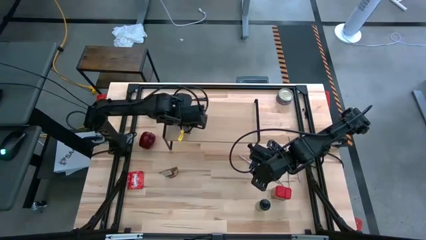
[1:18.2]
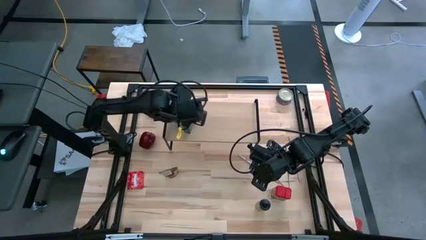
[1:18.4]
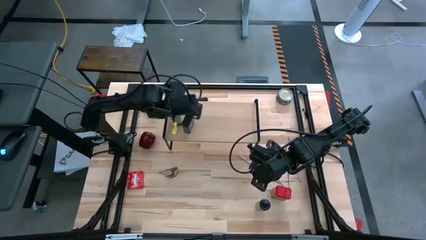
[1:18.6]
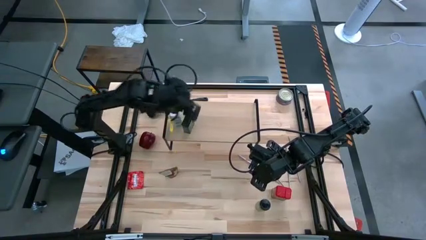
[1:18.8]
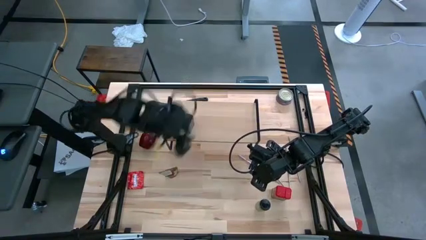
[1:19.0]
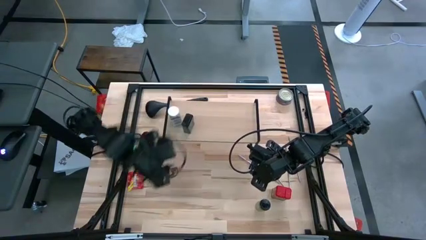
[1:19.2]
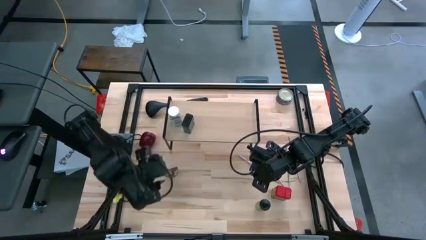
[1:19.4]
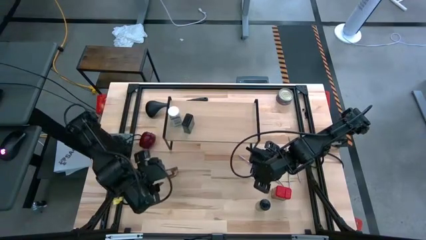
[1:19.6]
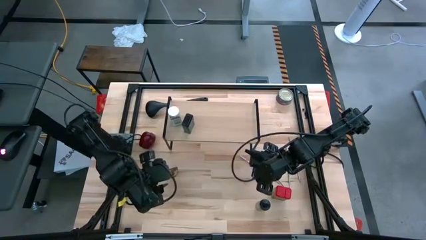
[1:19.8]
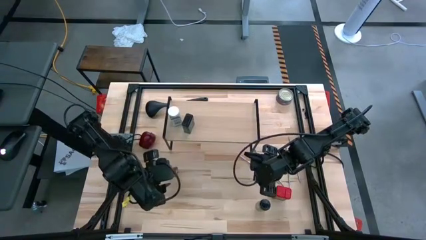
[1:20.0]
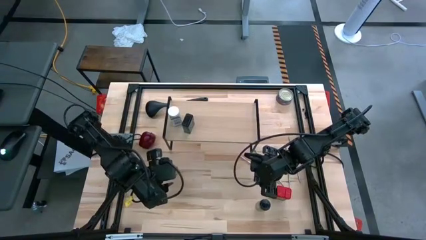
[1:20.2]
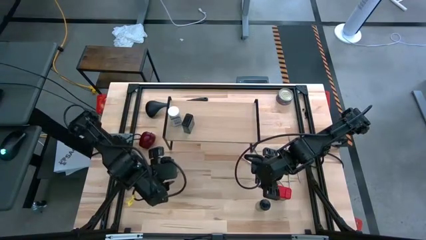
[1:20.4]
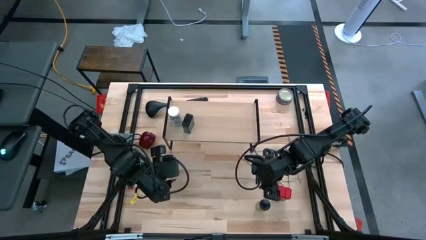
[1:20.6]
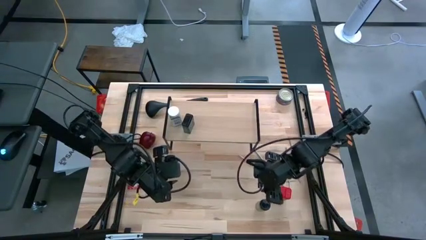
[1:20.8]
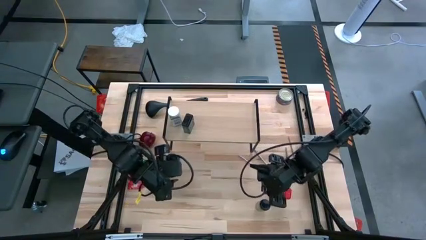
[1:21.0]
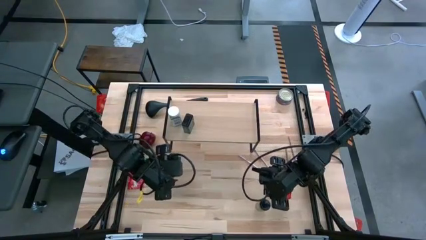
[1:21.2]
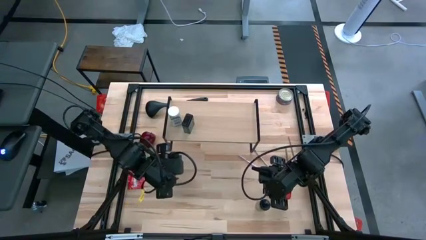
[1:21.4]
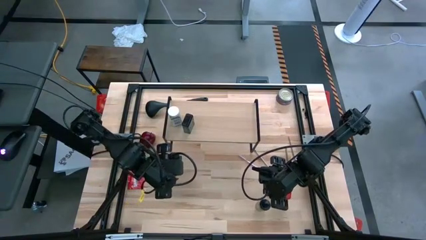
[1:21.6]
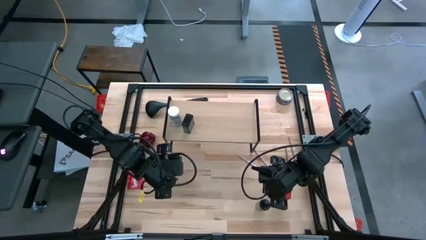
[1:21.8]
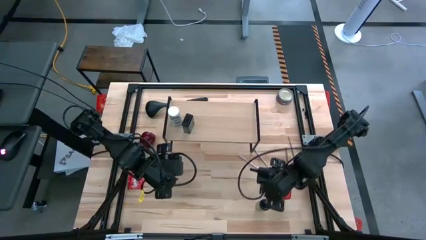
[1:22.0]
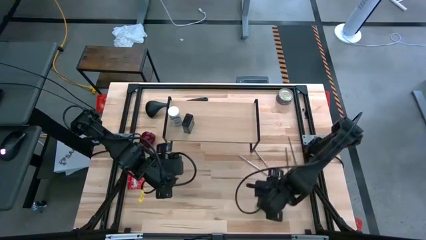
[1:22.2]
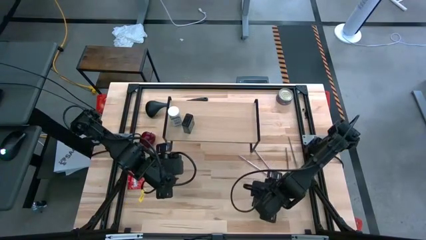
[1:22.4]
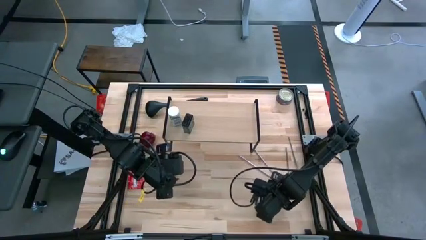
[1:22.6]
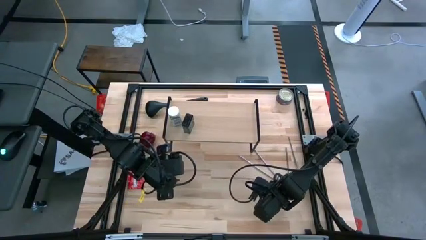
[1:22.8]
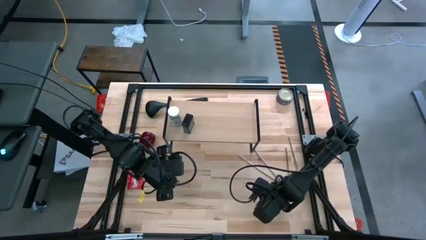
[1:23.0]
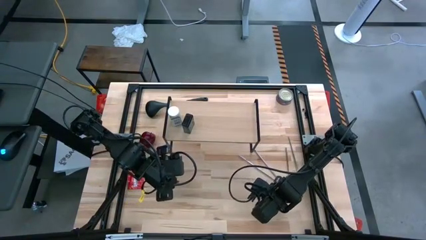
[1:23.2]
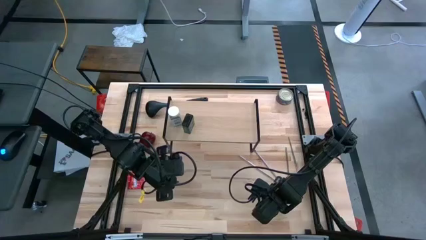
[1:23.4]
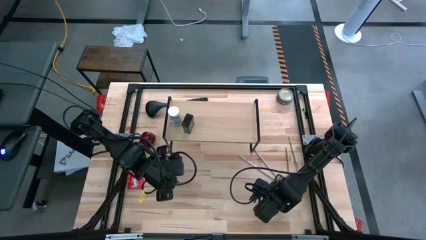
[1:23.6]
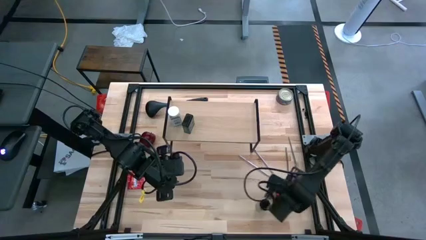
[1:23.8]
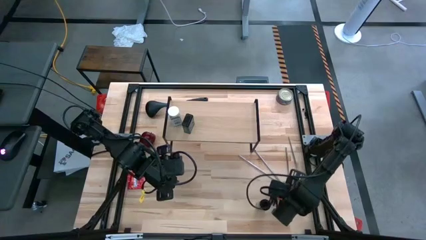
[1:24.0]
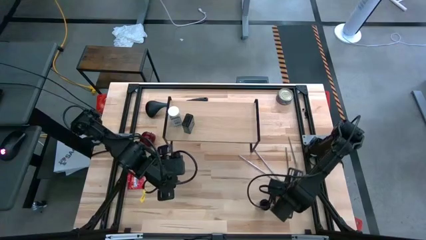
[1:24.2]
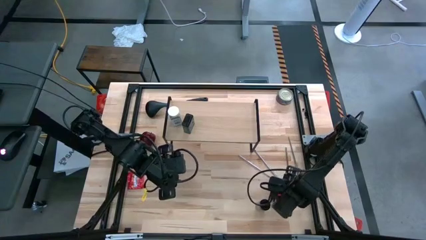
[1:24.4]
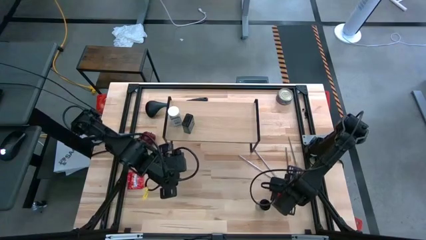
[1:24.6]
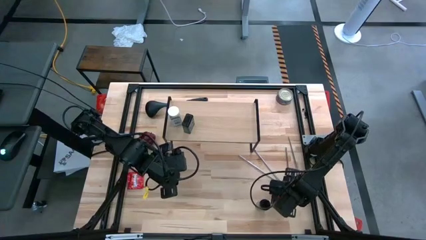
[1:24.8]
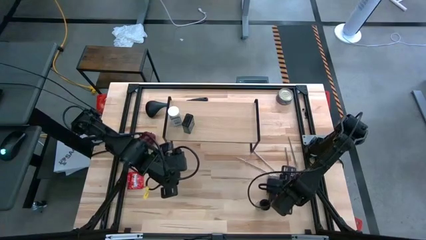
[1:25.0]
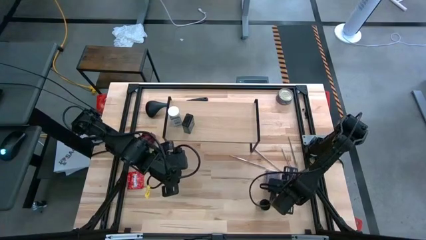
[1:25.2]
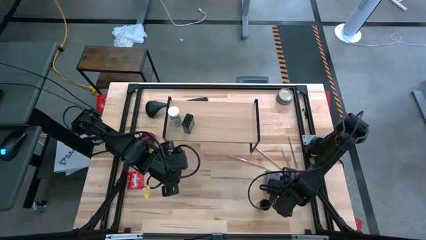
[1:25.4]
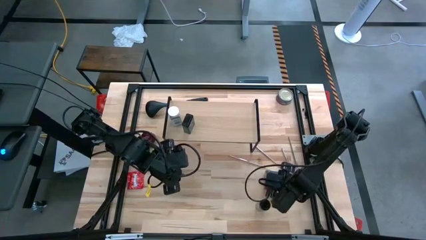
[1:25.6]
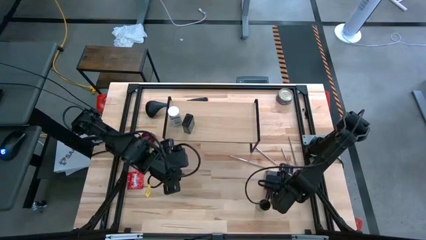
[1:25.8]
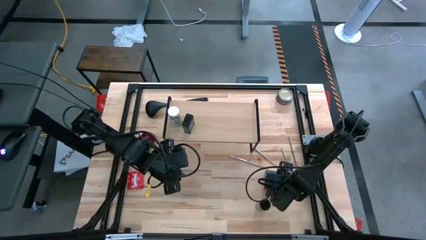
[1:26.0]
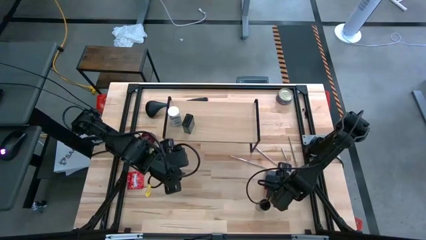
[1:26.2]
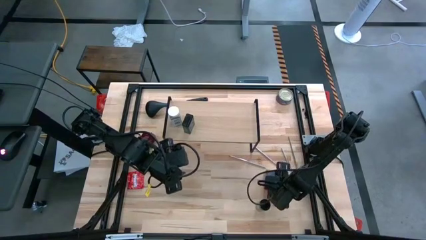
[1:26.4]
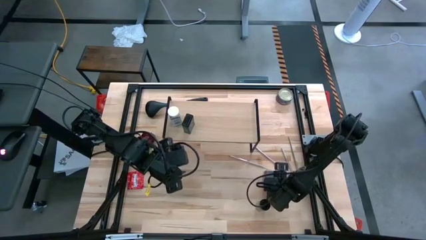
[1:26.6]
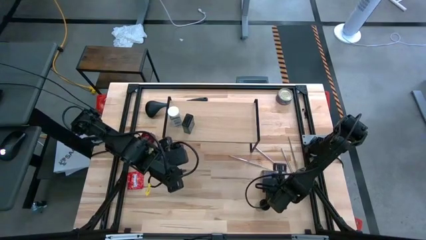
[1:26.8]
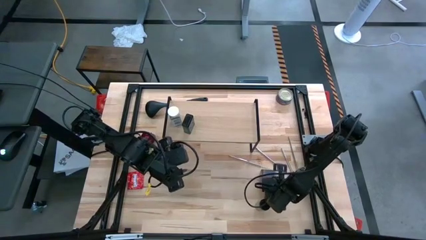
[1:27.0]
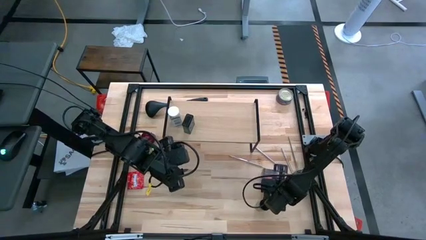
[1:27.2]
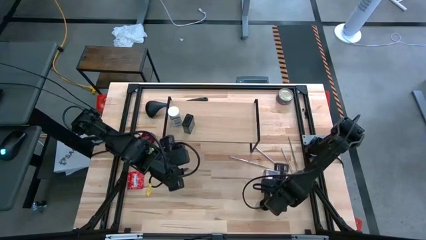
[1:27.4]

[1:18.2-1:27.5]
Task: Shelf spices
Put the red seasoning can on the shelf

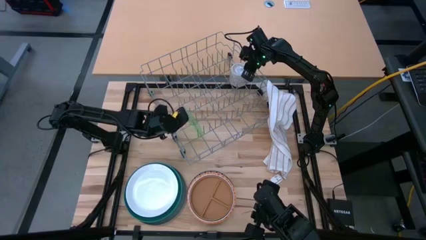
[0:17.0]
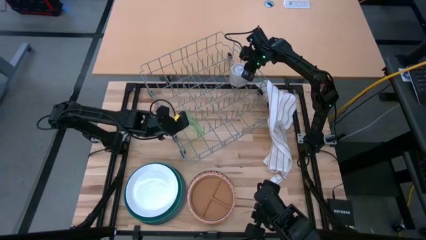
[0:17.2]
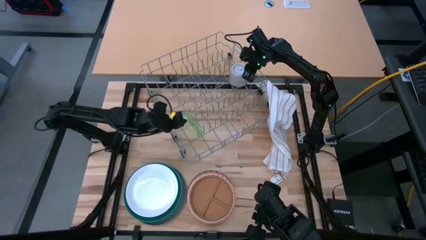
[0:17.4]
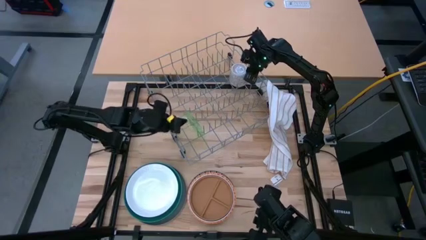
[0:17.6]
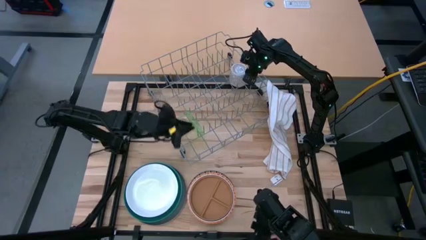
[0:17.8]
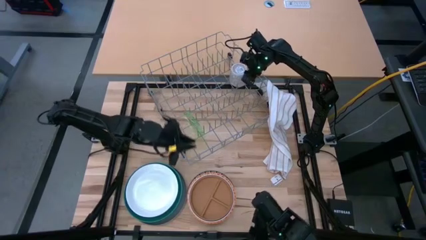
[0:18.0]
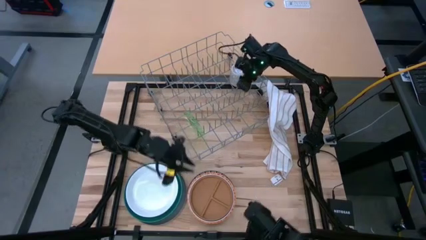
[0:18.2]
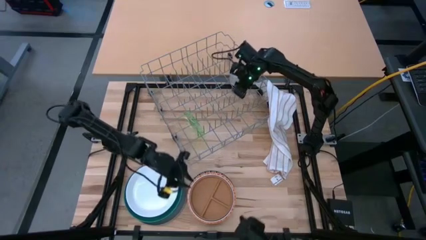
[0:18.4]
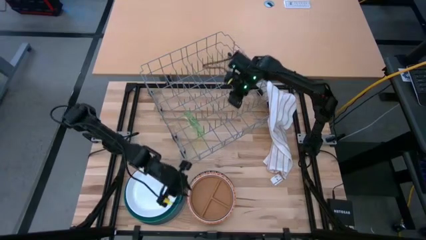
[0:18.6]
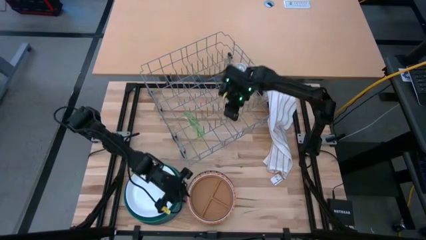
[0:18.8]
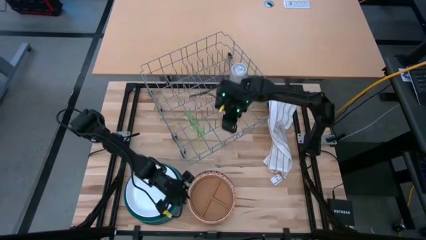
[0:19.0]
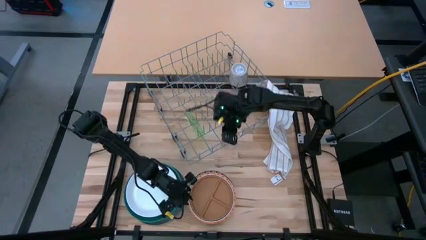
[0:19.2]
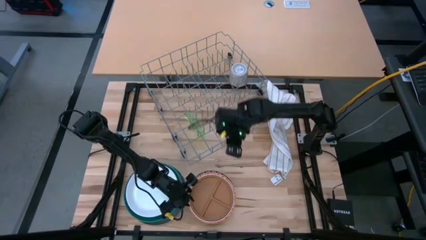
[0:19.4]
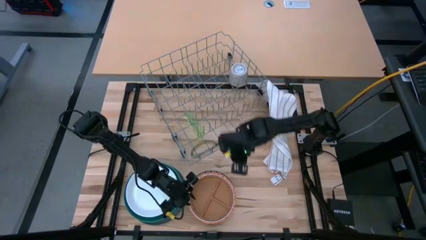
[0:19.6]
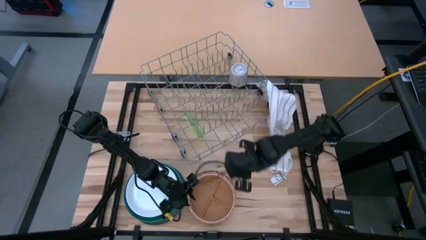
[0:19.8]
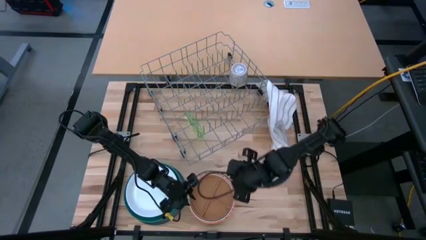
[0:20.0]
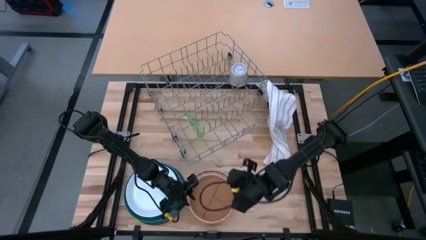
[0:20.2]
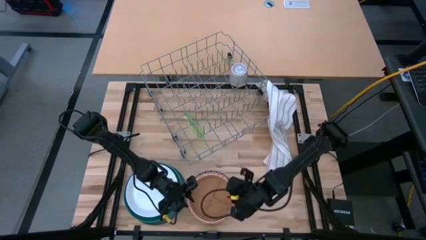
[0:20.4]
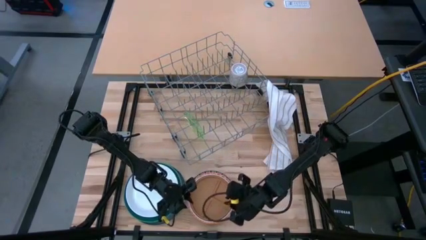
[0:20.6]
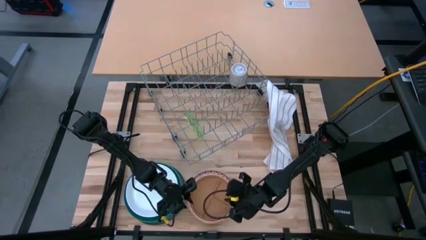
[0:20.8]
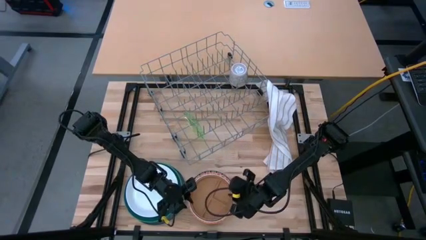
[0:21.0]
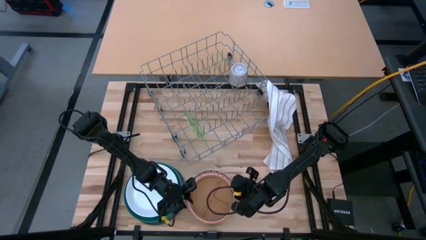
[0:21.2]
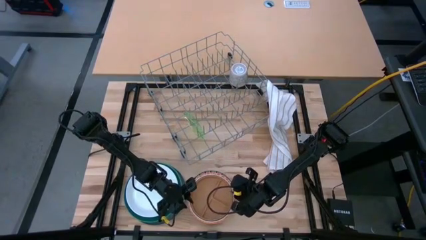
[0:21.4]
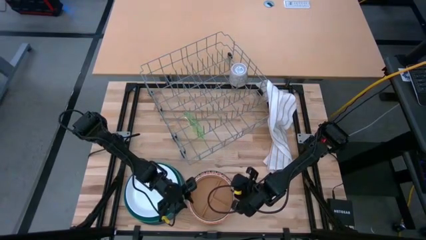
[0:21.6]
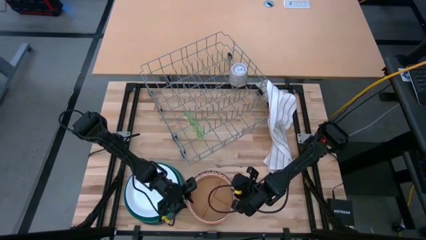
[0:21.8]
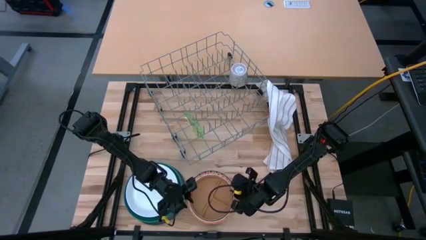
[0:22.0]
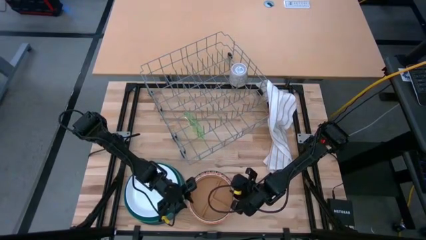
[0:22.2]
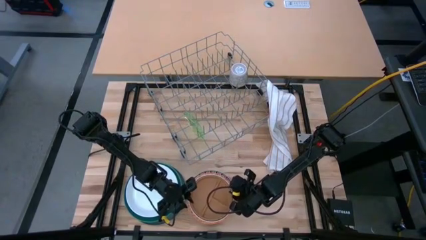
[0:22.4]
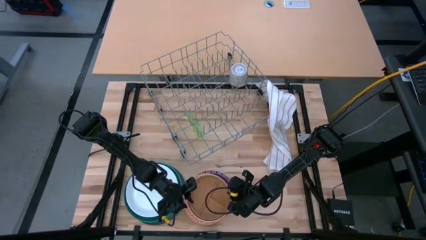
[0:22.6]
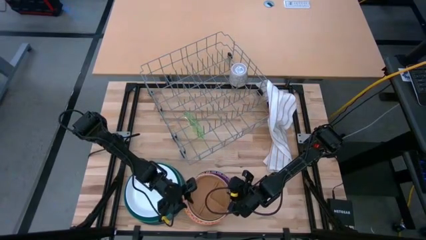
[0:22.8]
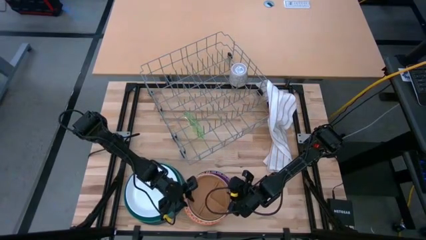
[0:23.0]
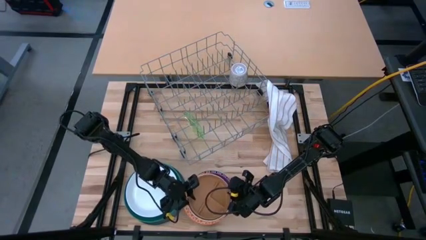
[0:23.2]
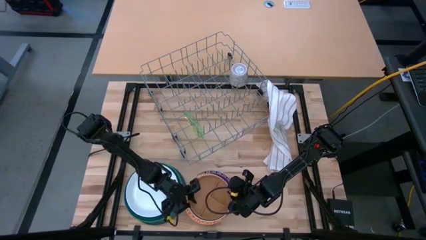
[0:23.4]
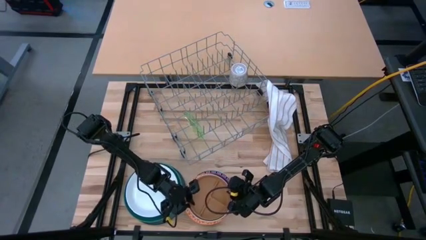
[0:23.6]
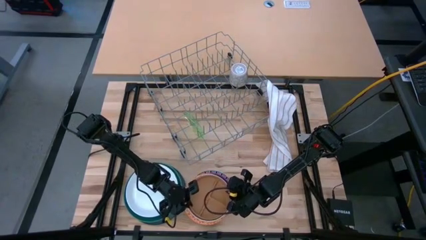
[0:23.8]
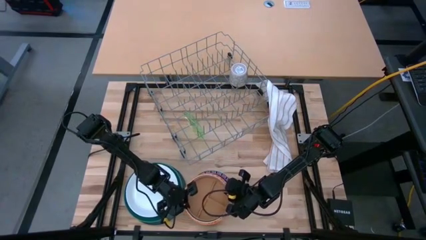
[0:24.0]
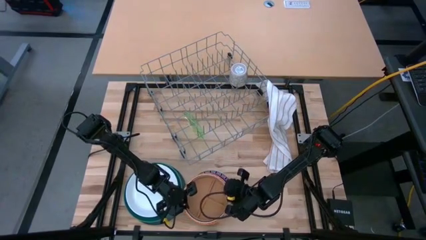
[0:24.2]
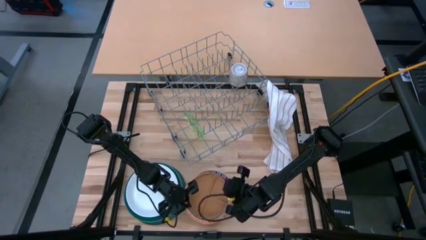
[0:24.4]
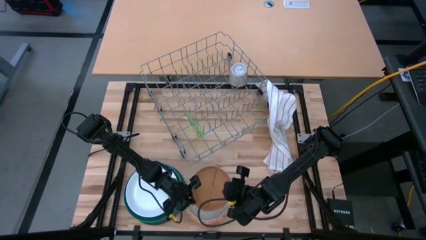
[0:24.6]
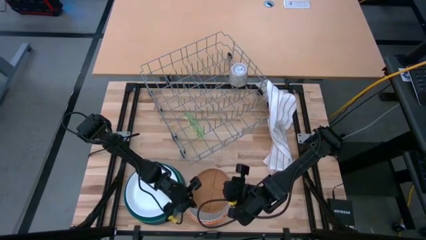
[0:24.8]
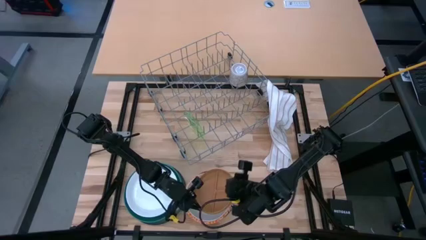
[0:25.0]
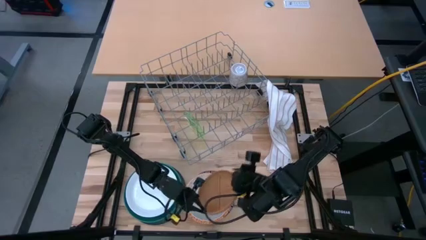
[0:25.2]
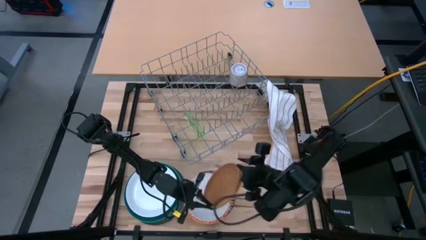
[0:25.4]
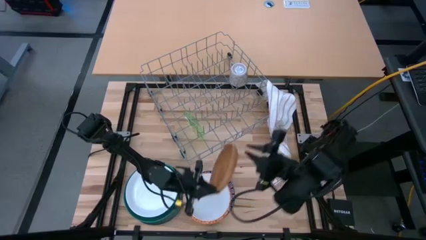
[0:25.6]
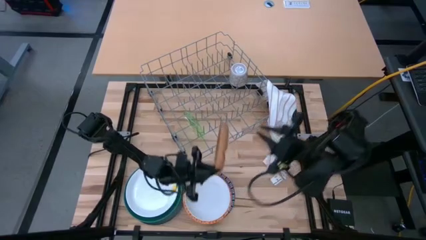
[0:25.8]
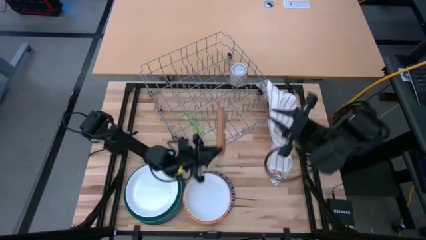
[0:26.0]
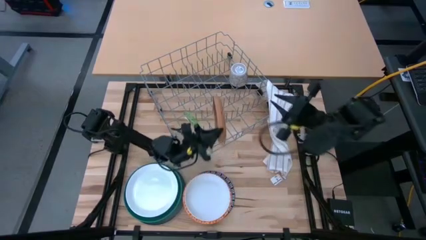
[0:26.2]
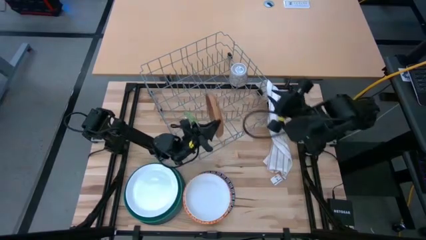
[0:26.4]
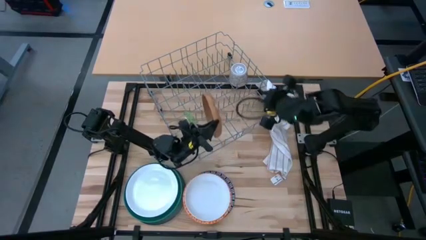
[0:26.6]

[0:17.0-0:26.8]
Task: Sort dishes
Put the brown plate into the dish rack
